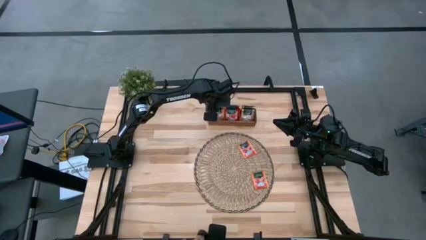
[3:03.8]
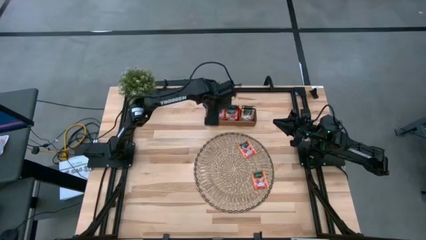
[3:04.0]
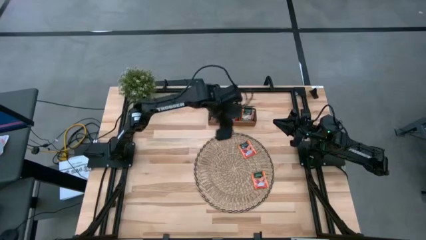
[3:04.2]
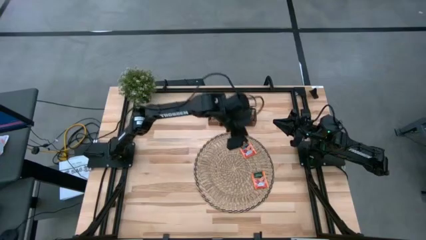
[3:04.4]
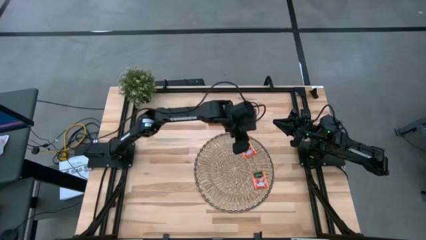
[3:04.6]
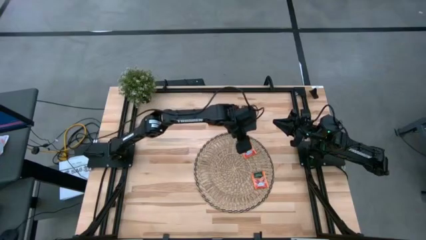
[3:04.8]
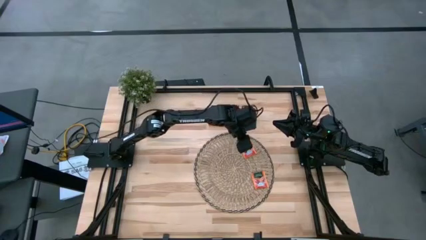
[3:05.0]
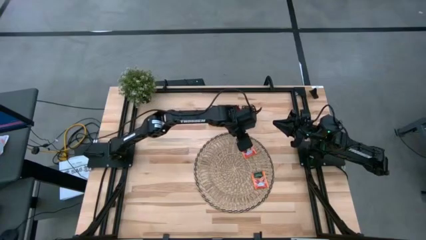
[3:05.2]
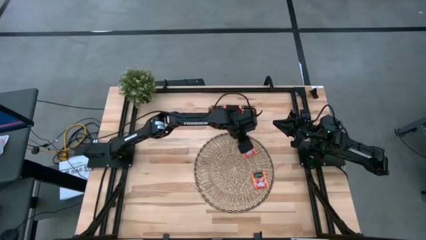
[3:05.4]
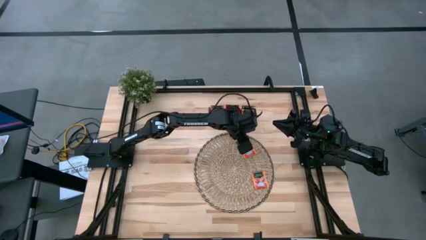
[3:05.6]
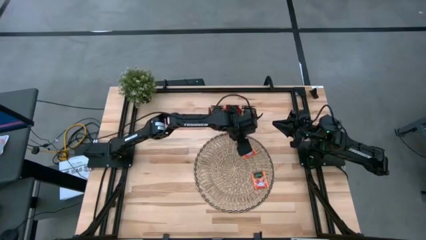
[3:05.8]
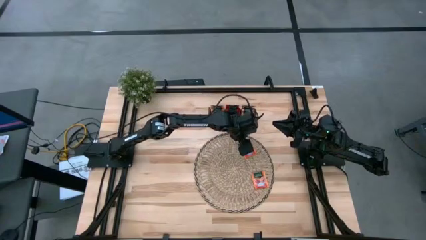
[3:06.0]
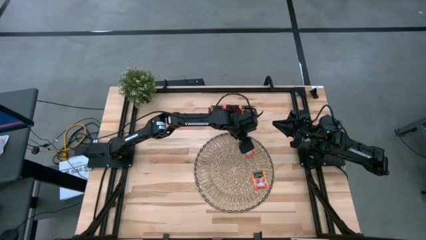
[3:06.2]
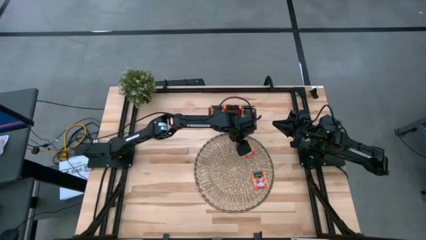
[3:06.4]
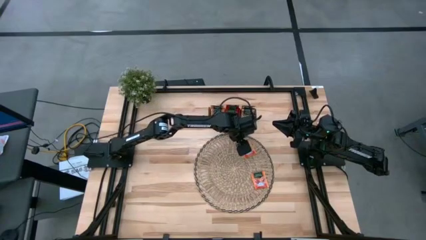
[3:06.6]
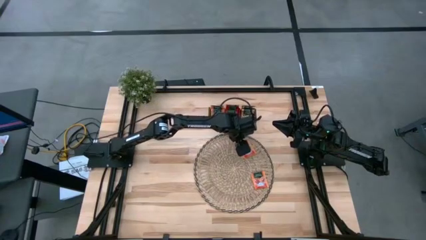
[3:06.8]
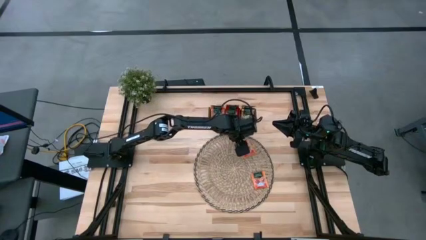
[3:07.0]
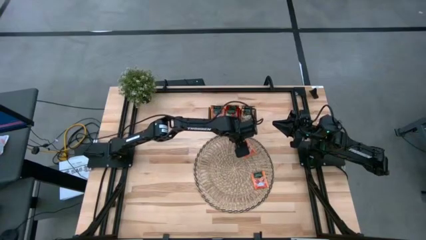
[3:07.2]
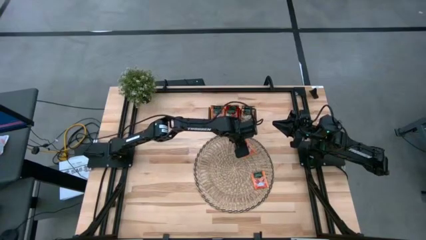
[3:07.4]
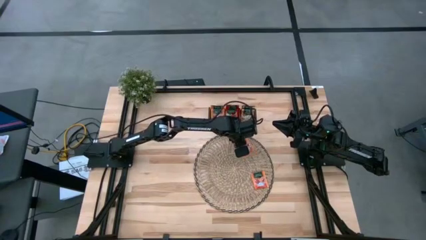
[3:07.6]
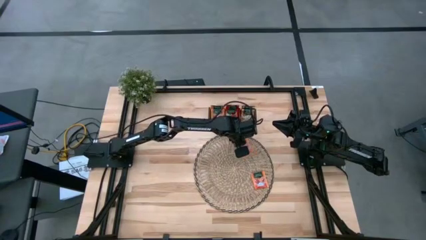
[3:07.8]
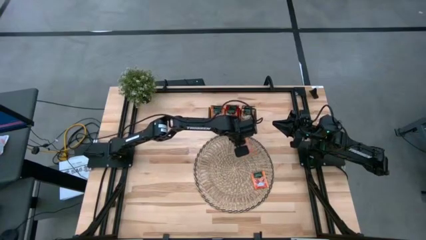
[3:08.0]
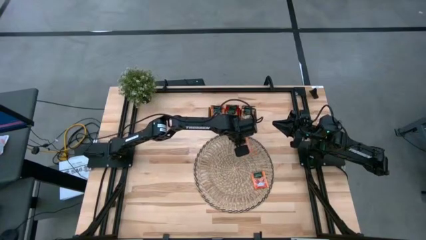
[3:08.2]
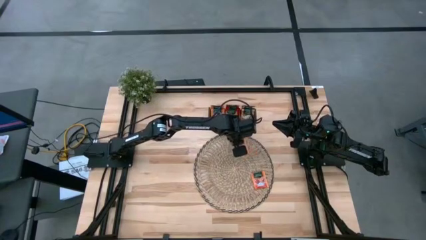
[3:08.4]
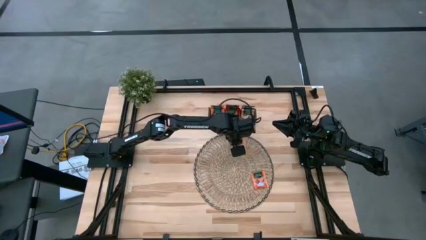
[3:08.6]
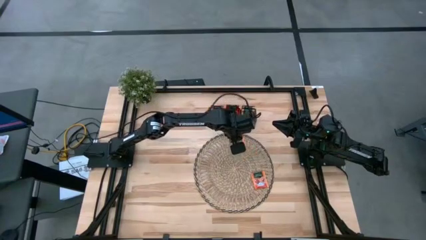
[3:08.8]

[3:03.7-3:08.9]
Task: Pick & Place Tea
Put the top orange tea bag into the left section of the wooden organizer

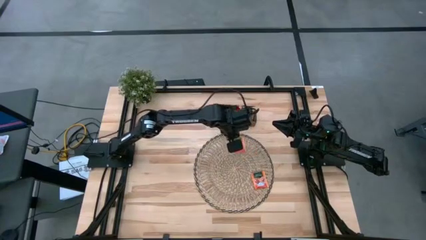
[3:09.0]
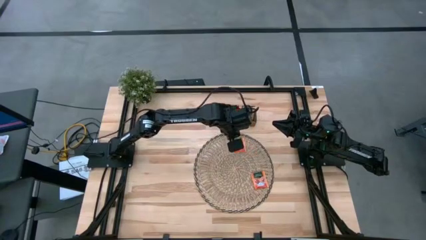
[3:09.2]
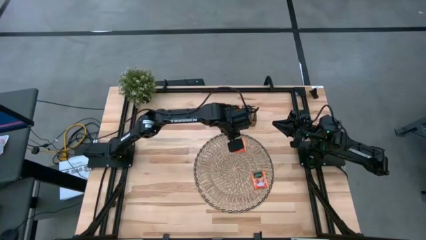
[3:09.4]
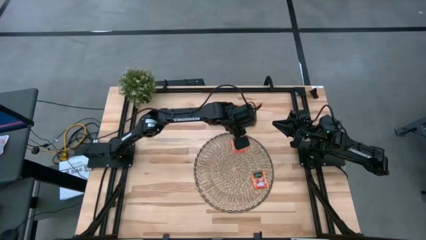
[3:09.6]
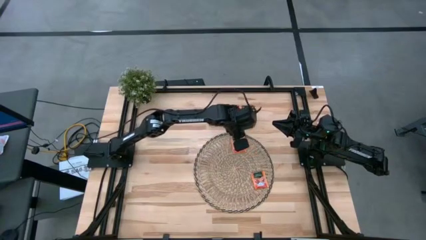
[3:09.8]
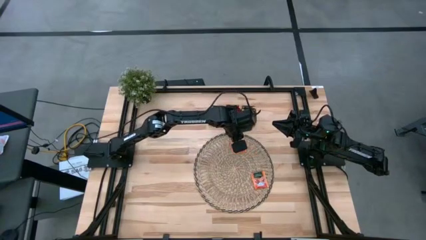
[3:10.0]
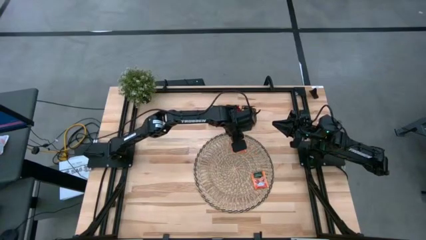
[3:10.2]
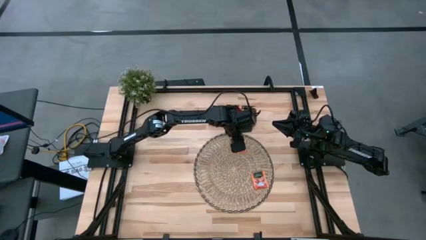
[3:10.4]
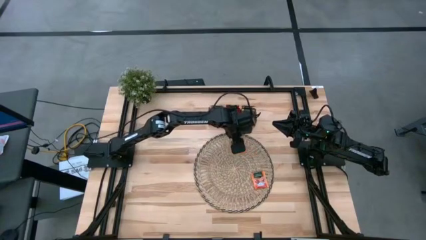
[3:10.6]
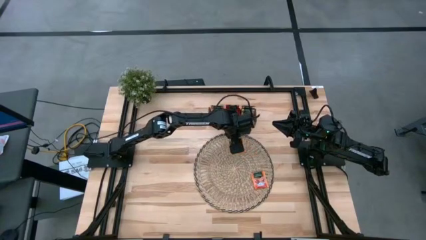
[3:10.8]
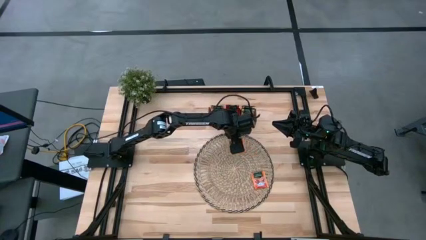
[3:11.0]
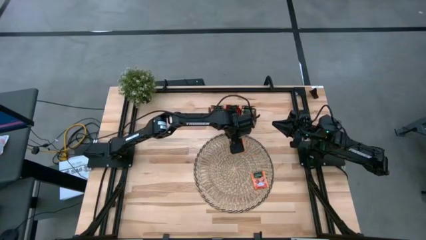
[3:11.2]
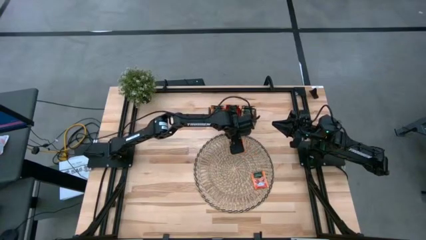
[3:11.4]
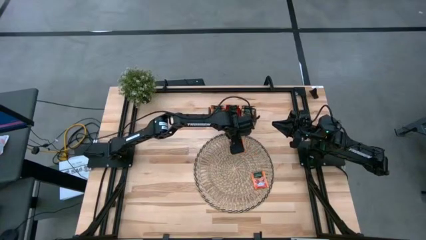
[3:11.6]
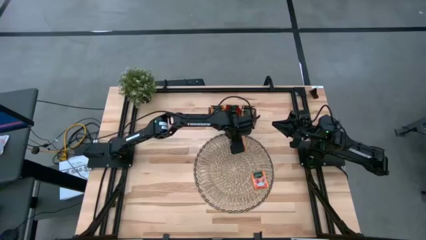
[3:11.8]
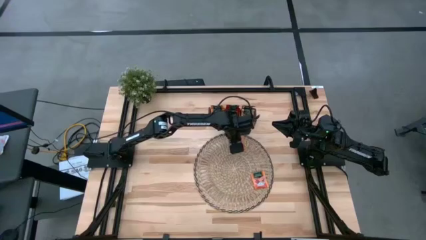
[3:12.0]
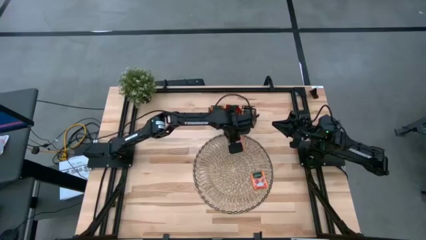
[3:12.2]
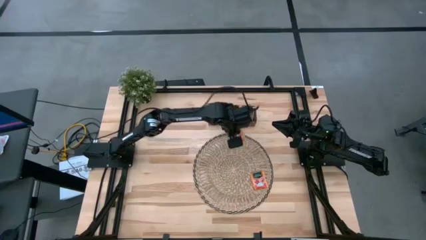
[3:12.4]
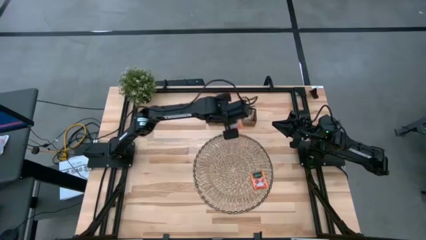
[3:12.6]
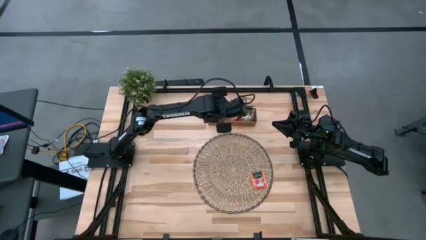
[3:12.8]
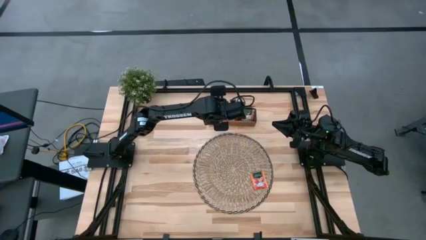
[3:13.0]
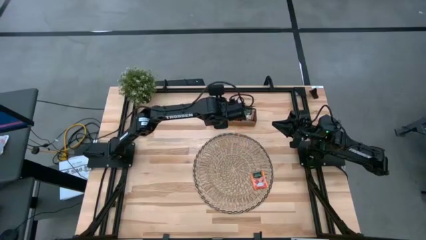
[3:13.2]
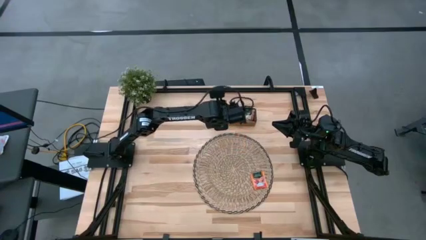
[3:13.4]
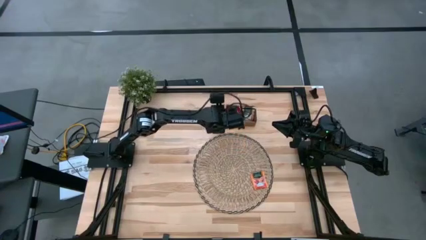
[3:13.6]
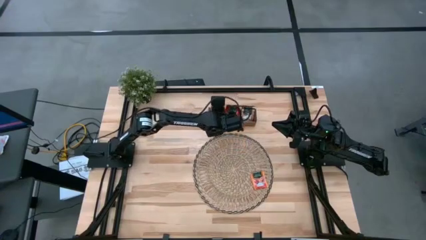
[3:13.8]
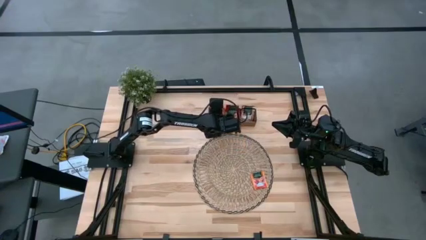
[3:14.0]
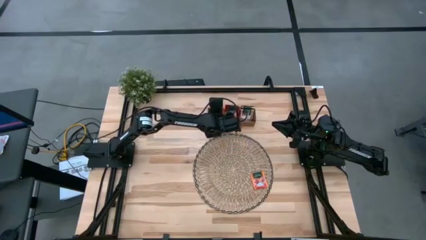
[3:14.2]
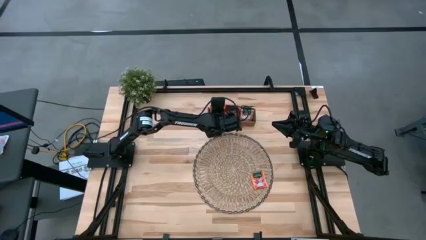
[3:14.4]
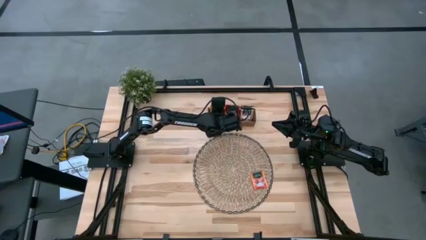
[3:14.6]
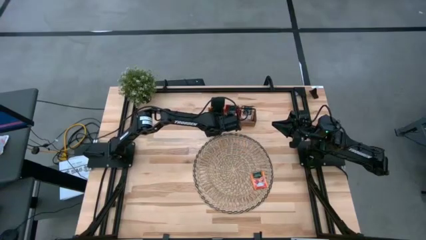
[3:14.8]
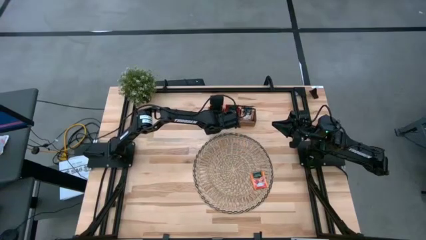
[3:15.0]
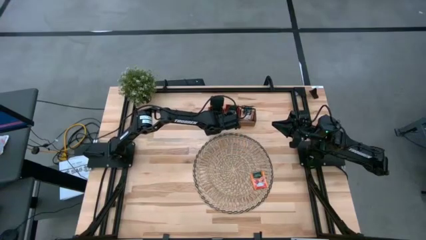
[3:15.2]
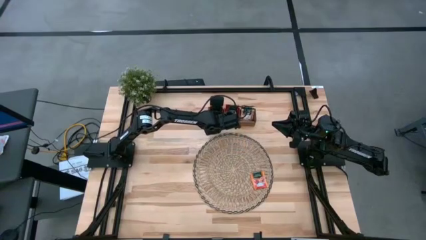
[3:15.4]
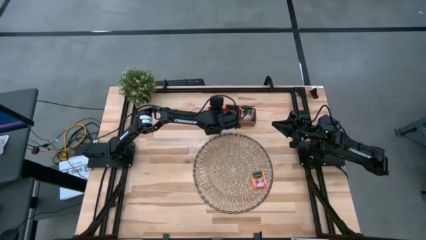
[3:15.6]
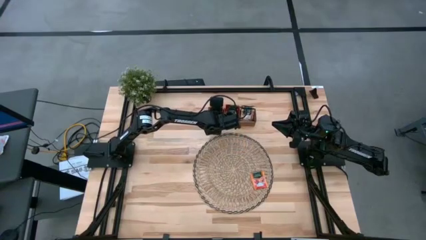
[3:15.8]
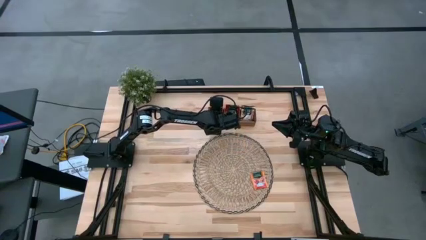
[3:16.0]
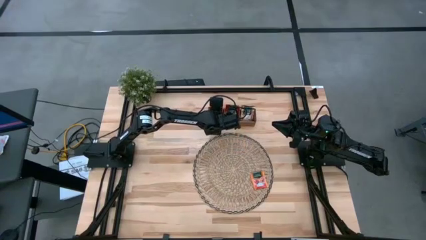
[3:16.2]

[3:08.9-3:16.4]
Put the top orange tea bag into the left section of the wooden organizer

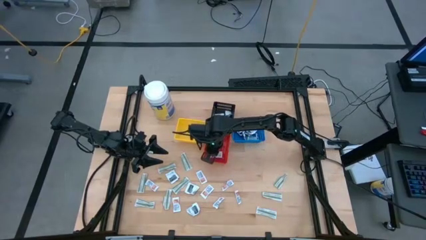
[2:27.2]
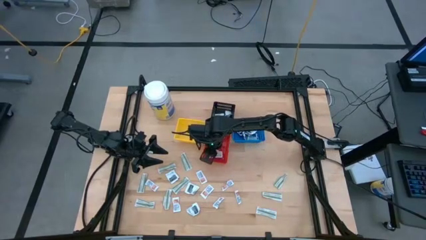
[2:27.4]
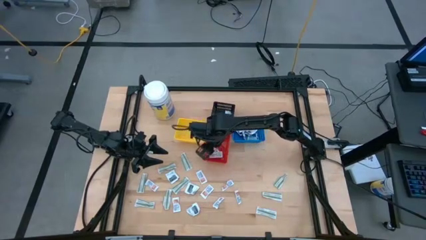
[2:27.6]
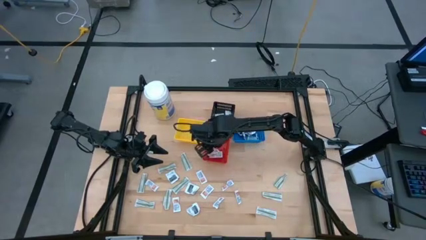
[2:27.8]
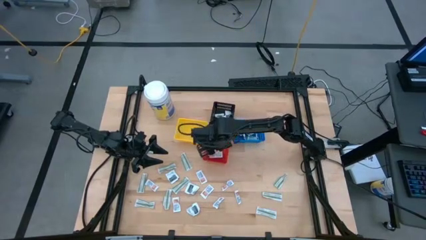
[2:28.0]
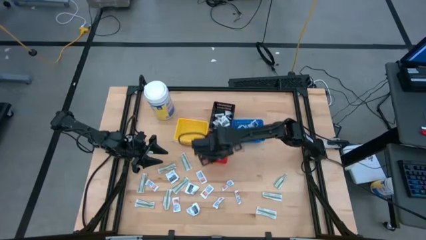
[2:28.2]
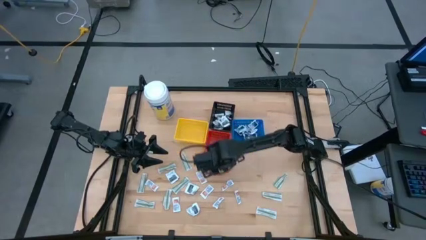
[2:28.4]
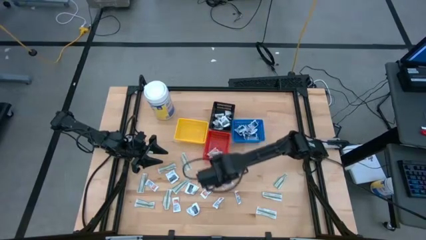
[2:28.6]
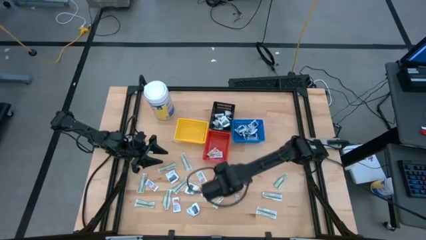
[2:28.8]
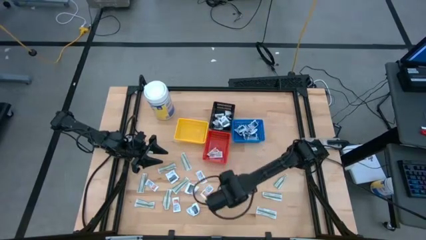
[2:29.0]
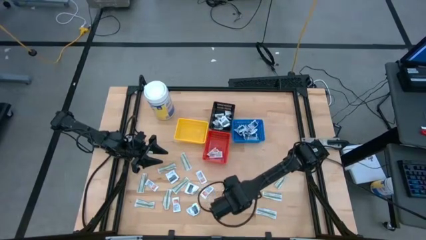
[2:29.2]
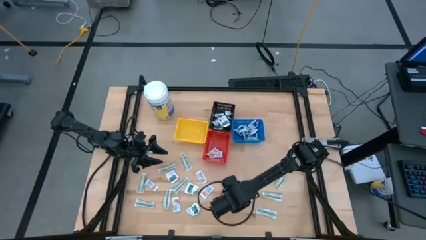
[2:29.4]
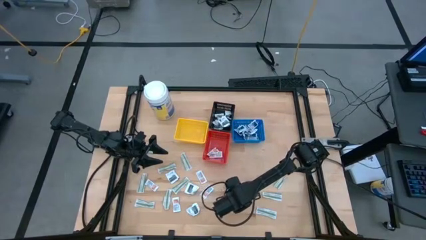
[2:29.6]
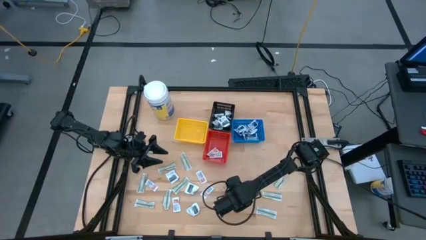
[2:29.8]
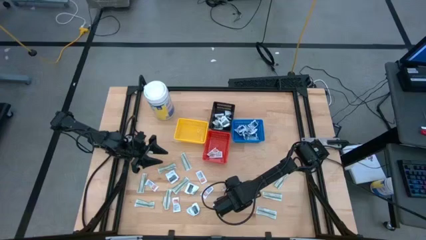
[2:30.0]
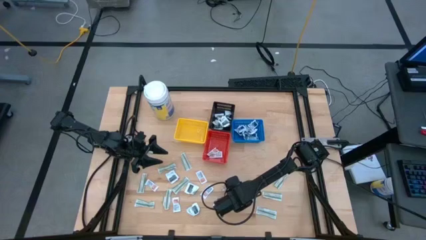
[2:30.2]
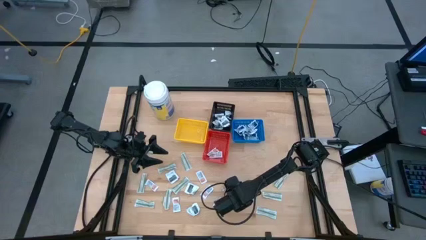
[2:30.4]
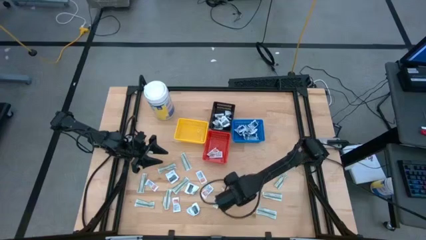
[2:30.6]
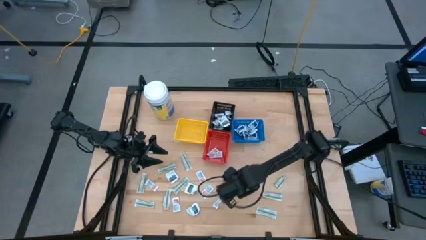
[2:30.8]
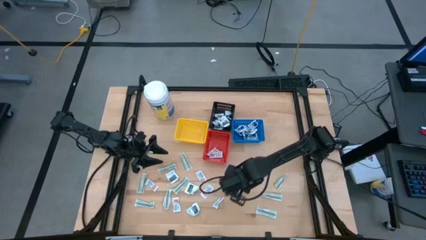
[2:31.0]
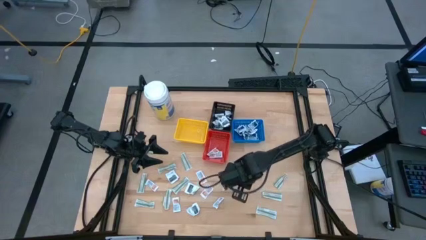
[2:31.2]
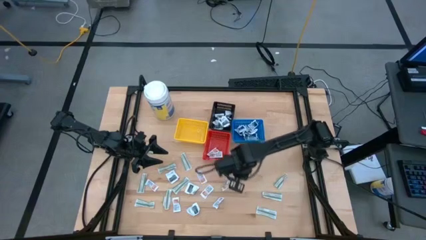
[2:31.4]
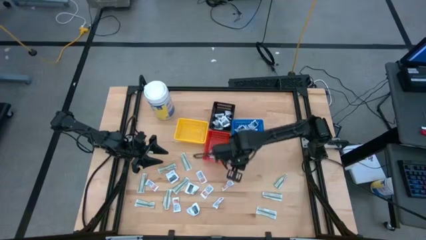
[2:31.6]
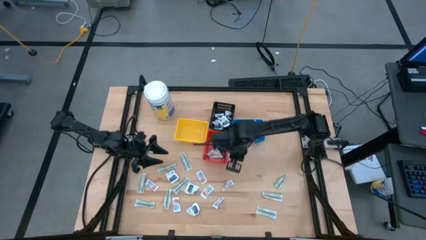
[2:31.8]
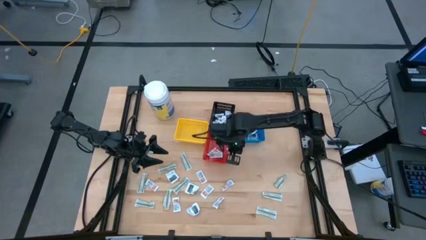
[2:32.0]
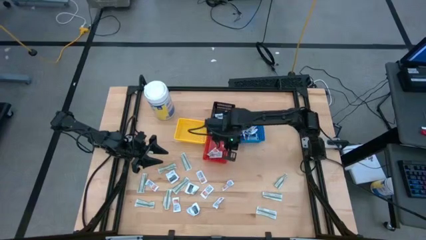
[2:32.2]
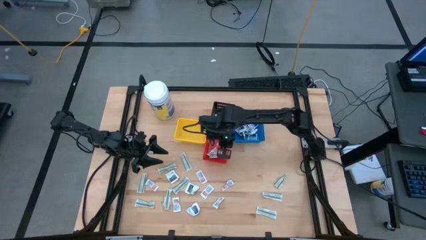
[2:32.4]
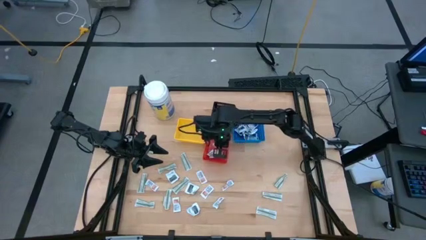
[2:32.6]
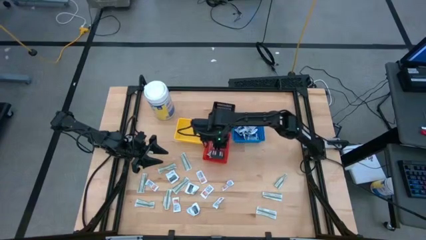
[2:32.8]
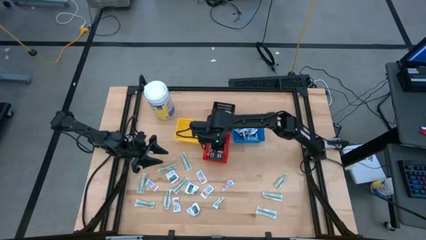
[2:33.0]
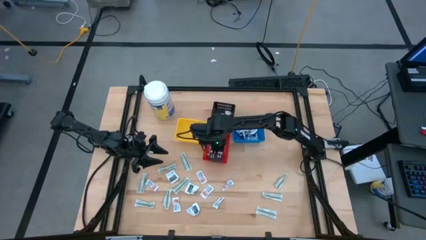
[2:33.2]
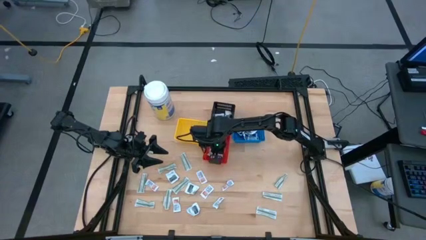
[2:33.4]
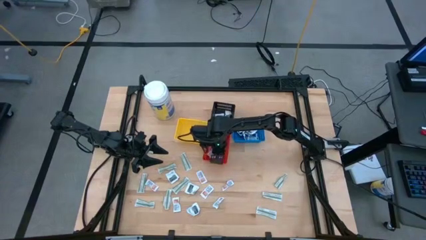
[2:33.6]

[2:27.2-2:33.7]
Task: Pick & Place First Aid Supplies
Put the ointment pack into the red bin
